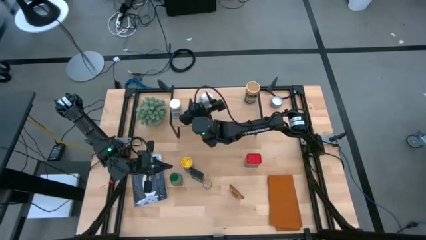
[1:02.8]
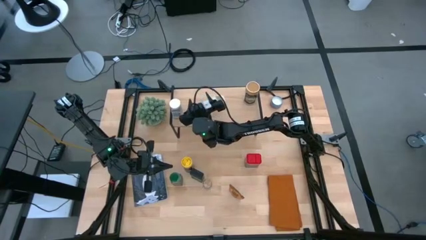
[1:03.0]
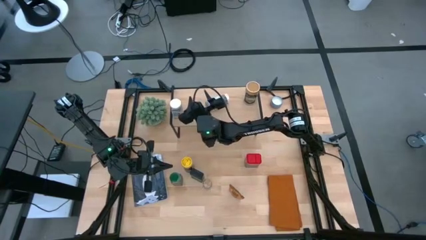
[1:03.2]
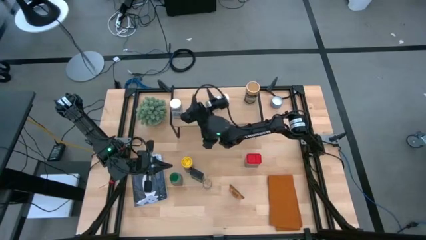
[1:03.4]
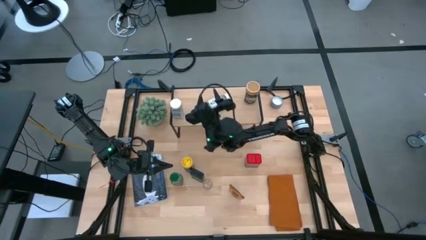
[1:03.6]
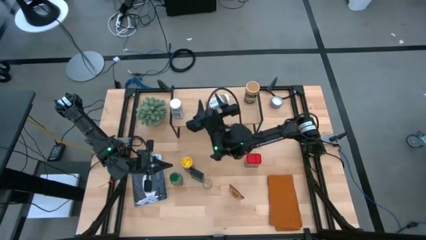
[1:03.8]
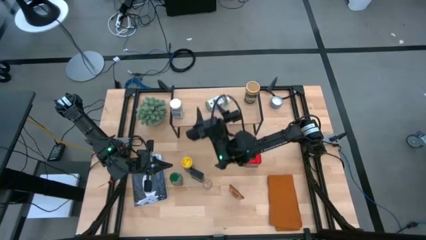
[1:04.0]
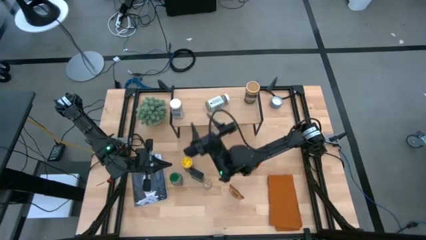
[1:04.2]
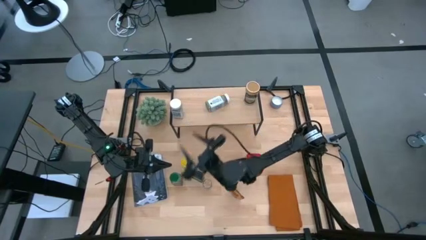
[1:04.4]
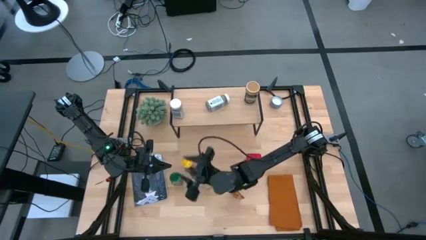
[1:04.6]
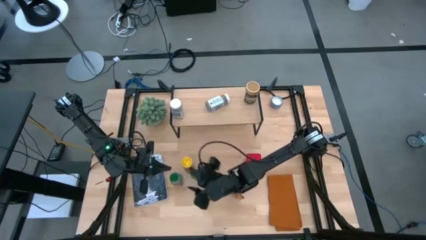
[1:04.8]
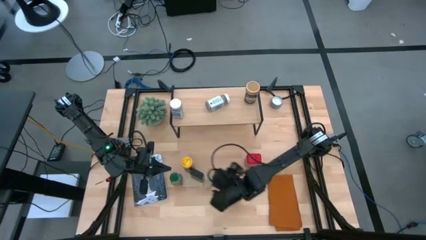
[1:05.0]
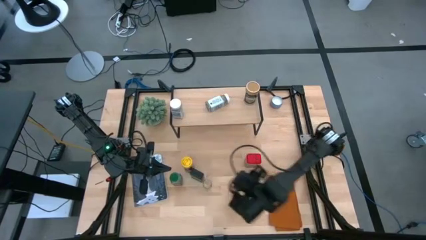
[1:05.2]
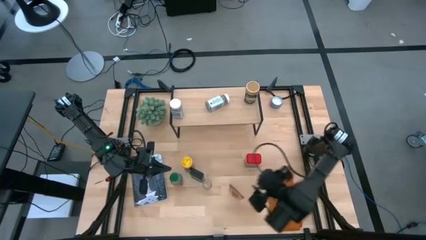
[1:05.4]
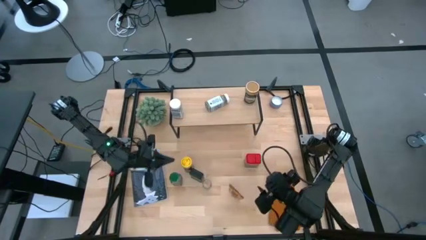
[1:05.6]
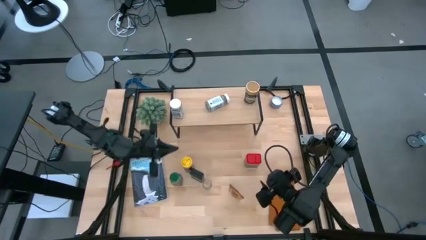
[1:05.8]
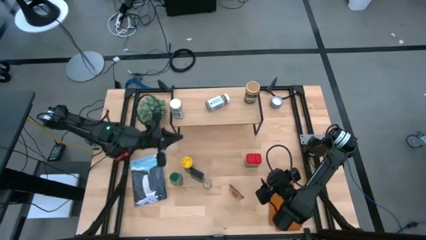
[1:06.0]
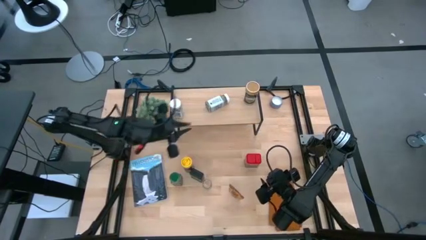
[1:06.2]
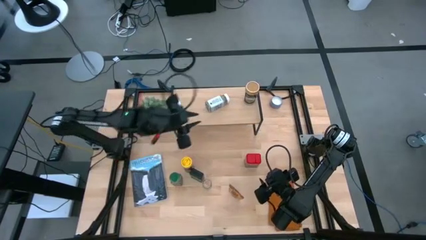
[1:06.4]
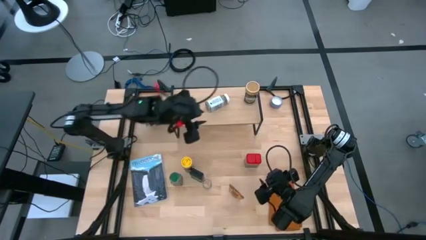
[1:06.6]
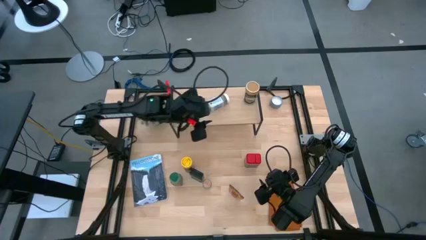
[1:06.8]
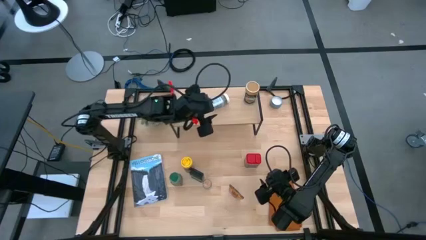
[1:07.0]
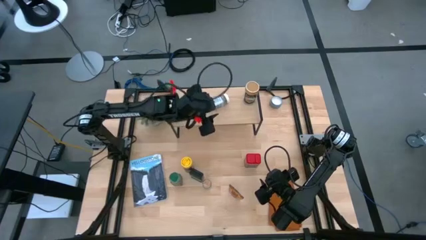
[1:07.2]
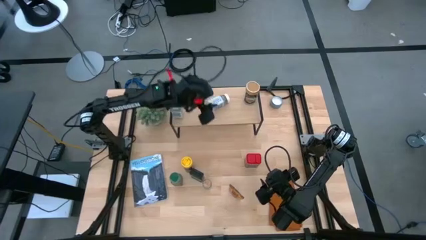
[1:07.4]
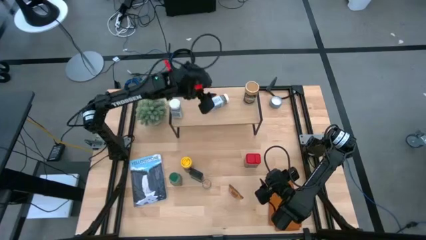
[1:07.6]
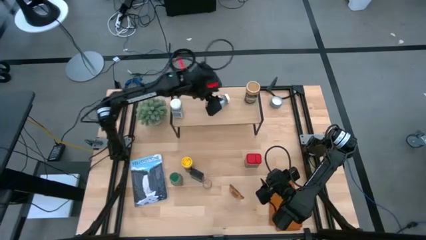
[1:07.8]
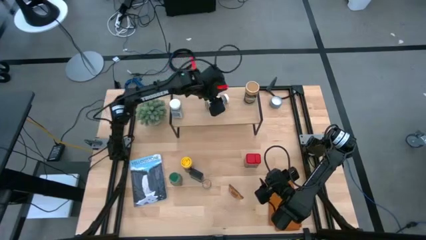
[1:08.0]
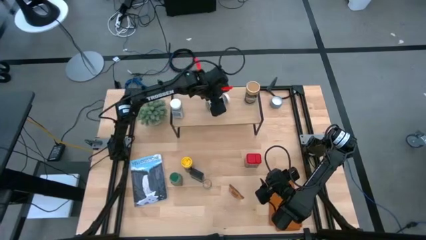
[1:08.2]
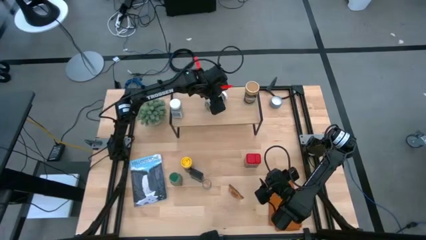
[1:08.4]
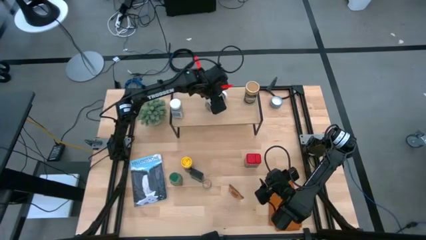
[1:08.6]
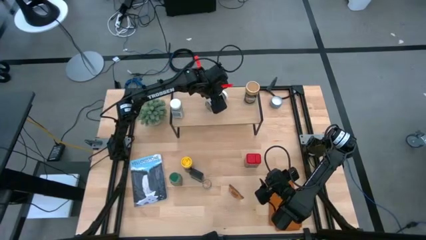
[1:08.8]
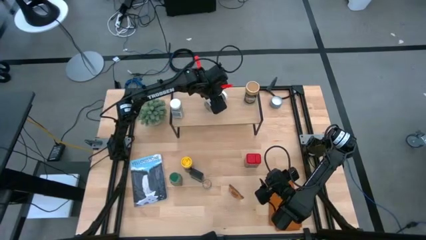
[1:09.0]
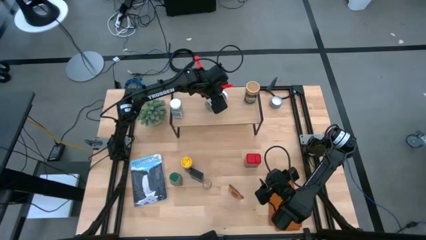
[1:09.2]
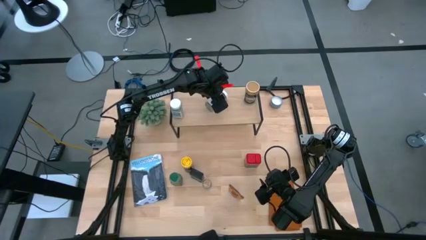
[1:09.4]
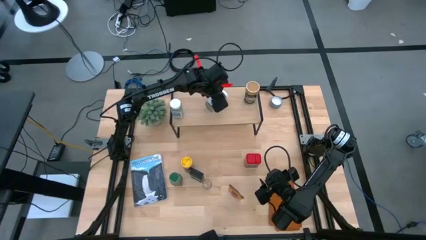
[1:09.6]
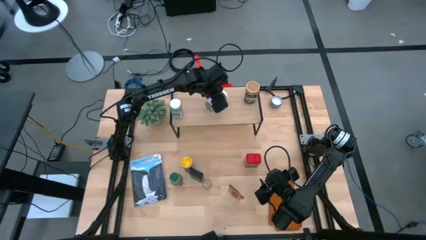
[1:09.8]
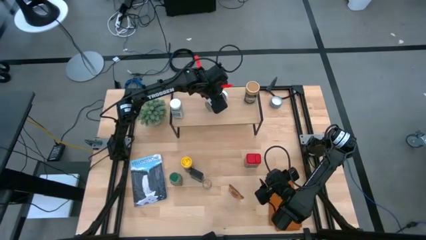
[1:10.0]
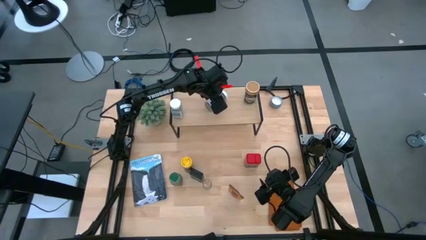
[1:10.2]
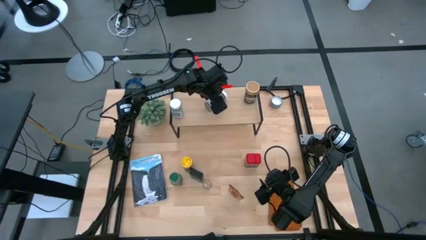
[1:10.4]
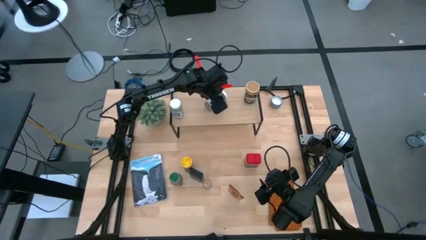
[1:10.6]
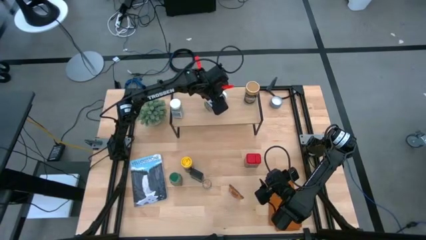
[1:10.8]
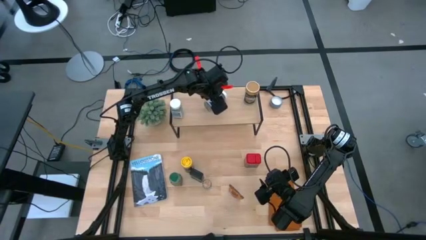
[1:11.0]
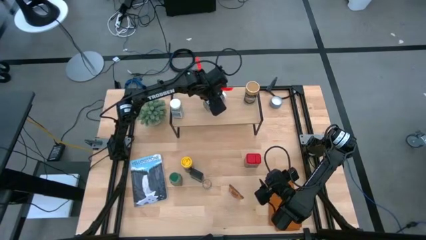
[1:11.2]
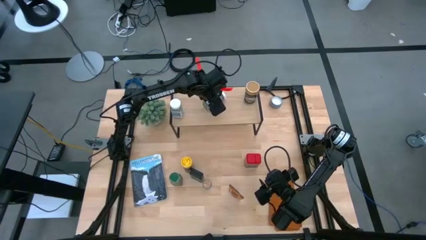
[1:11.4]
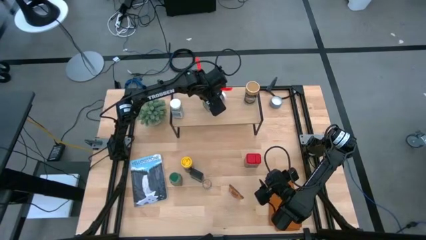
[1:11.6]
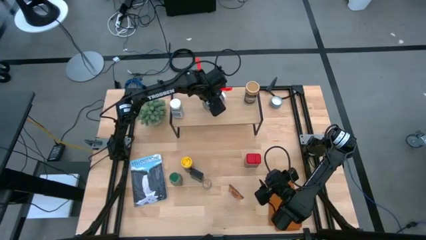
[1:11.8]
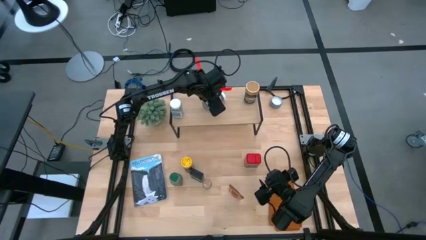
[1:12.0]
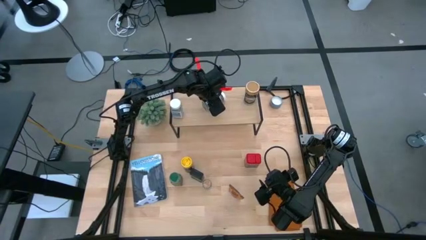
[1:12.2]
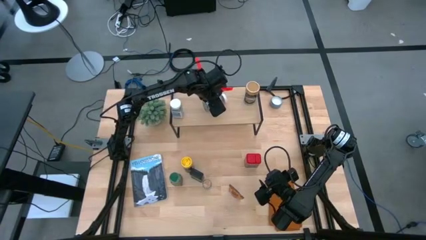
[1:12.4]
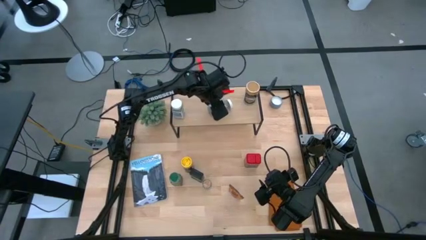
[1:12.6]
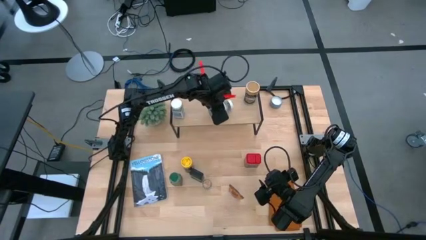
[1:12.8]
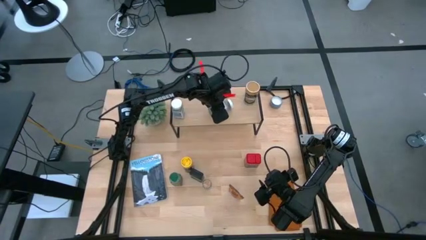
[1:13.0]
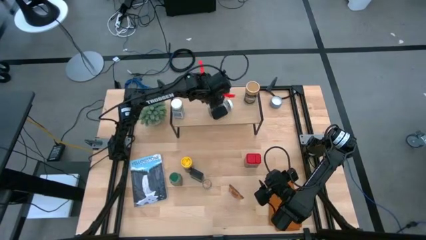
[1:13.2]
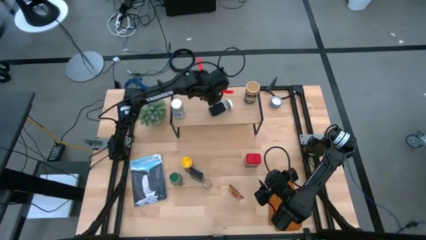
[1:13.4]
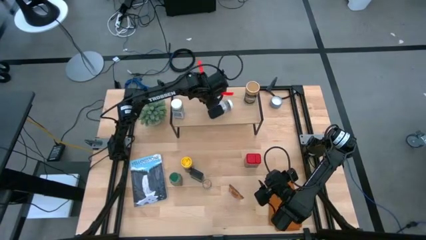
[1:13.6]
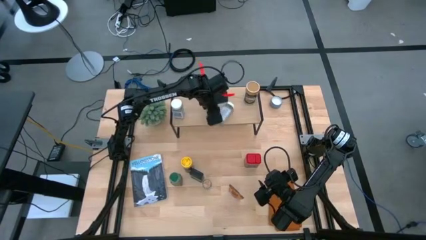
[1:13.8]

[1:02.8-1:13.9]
Task: Shelf spices
Put the white seasoning bottle on the shelf aligned with the other white seasoning bottle

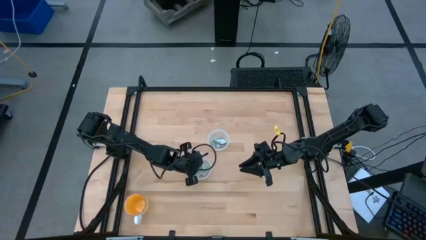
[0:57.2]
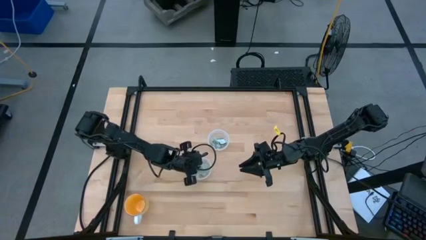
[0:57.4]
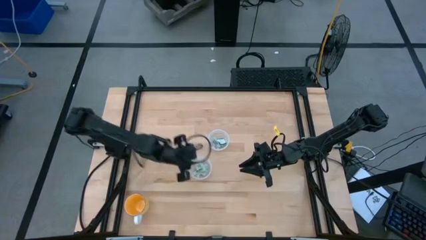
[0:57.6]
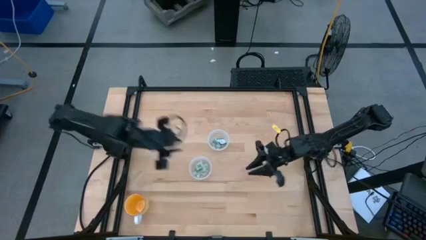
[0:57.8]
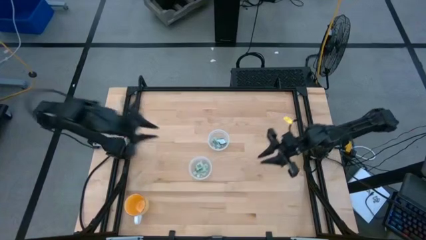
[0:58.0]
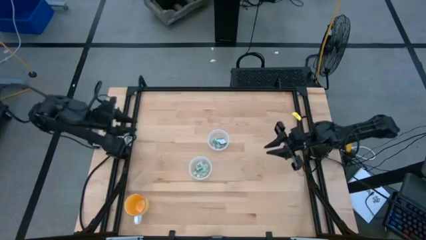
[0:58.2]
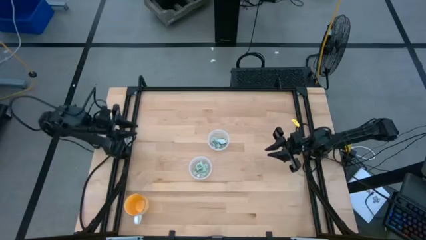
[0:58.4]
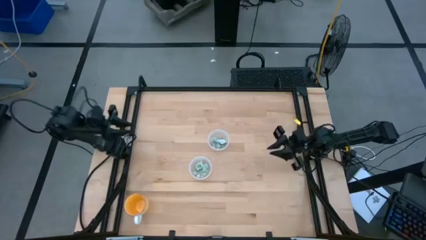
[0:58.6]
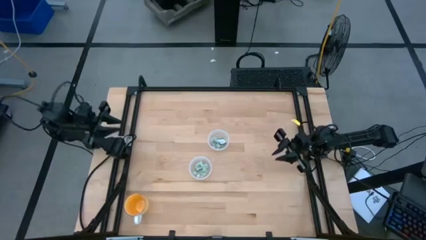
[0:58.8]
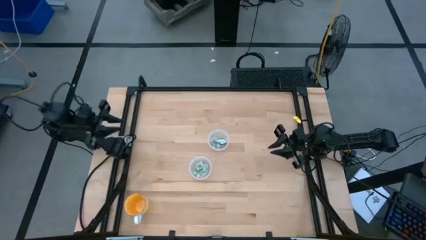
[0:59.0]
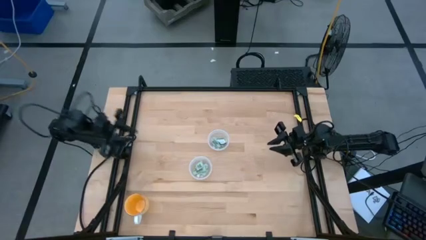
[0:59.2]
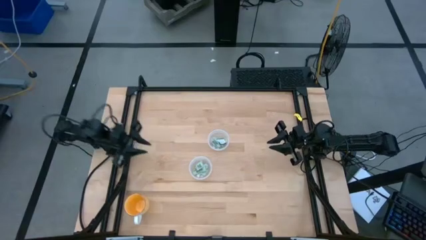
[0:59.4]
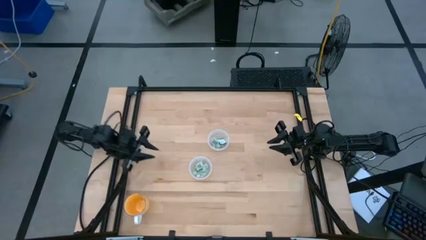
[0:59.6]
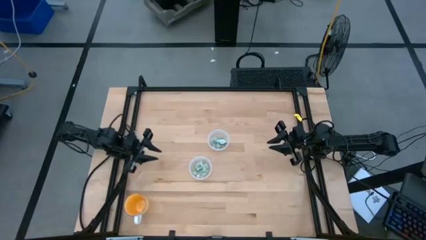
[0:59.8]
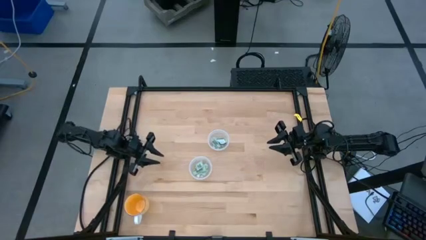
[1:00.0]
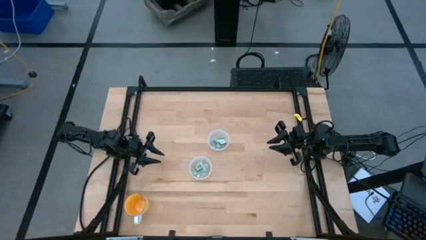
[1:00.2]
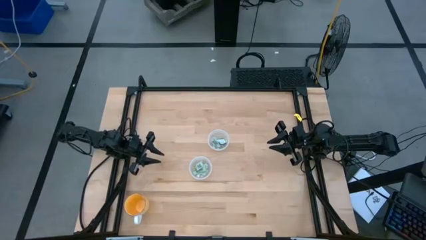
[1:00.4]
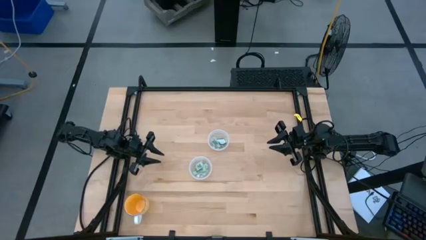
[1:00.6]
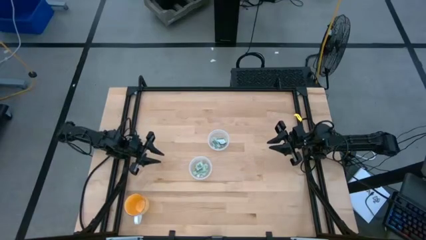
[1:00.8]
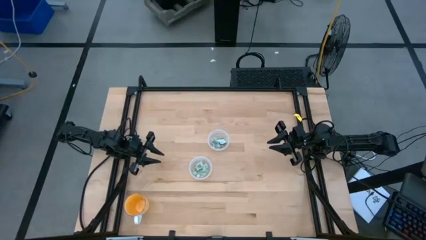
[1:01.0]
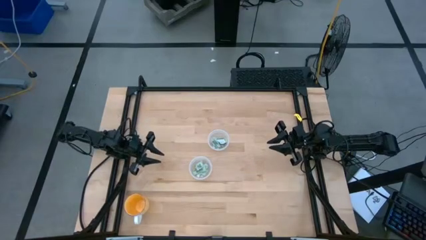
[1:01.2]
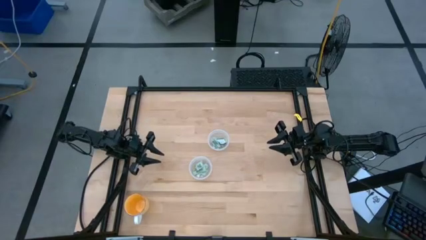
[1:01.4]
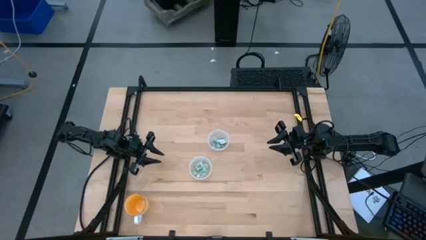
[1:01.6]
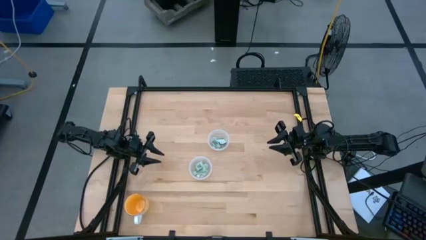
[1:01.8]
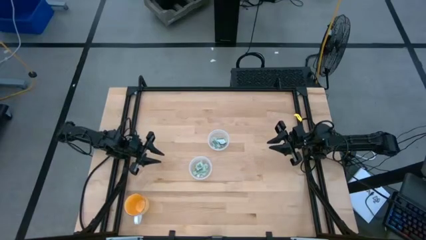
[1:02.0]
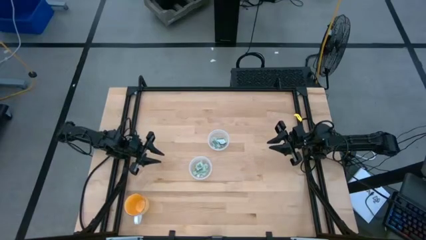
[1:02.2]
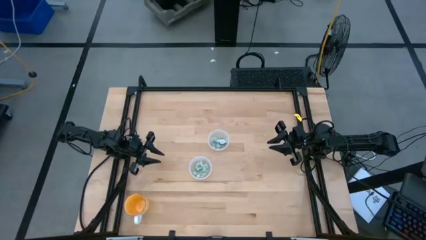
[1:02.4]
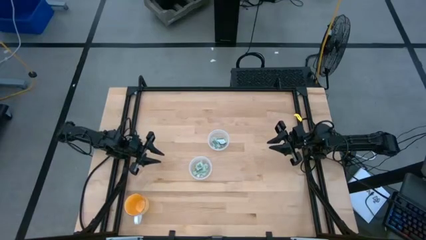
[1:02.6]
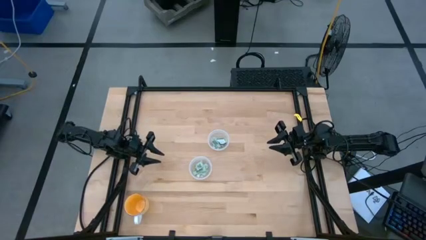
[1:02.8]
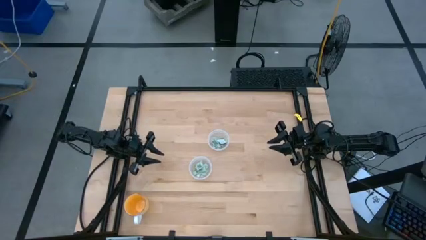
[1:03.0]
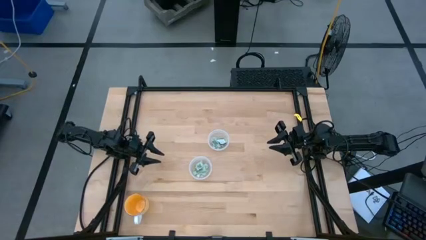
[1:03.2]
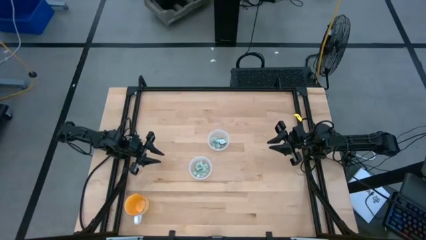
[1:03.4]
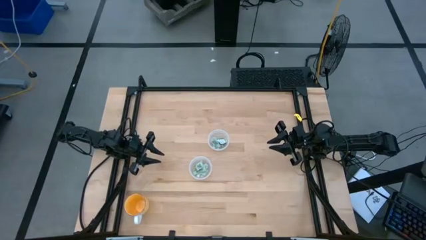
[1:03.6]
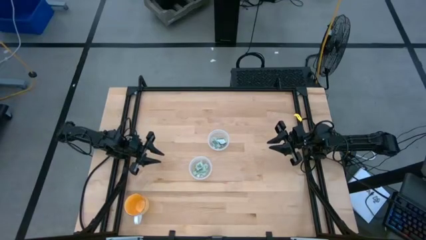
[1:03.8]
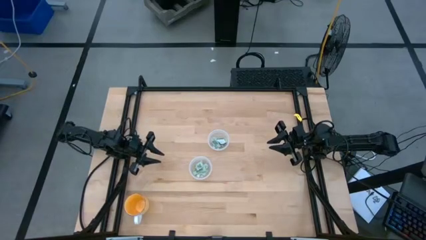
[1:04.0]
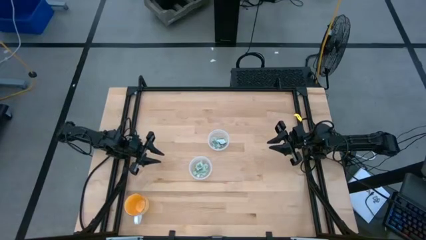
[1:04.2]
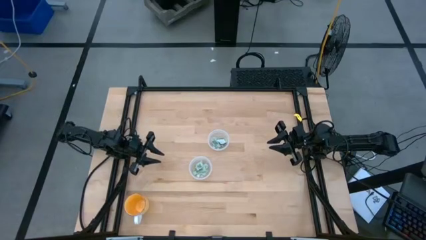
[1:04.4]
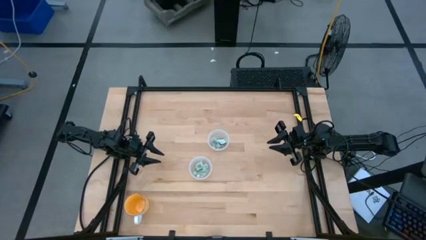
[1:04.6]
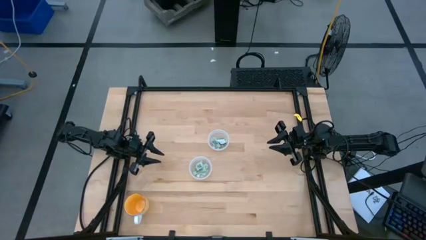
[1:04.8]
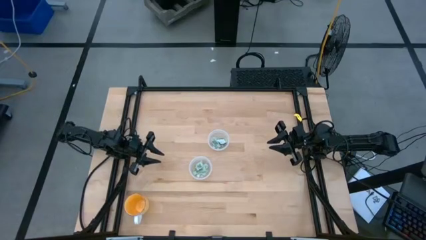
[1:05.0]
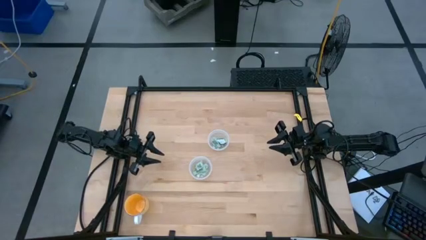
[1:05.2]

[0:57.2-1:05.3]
Task: Pick and place Stevia / Truvia into bins
Return to Home Position
